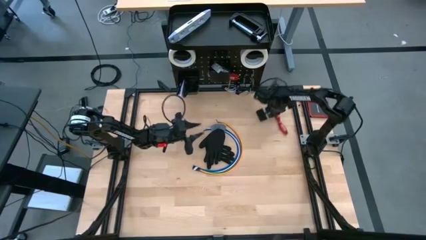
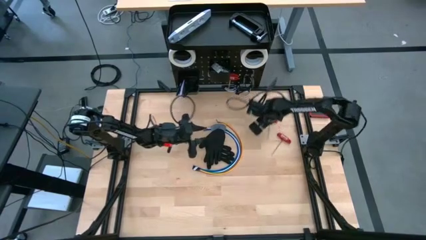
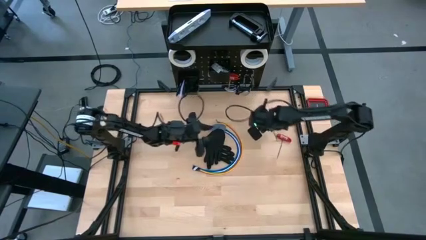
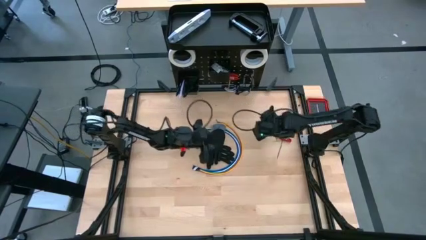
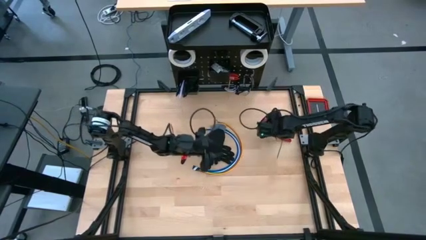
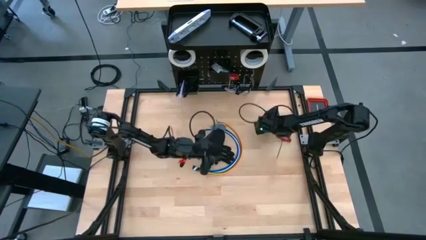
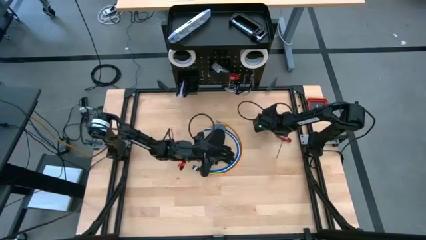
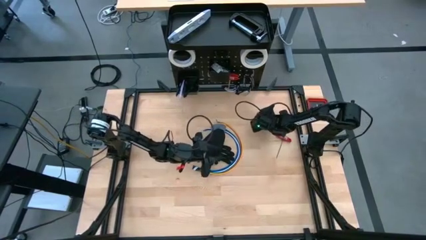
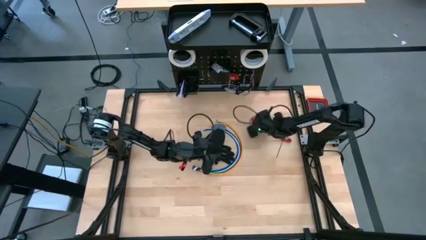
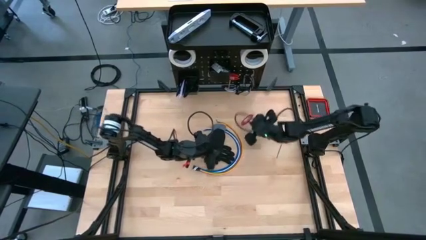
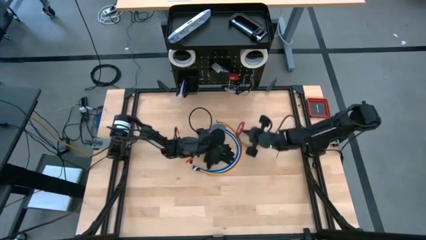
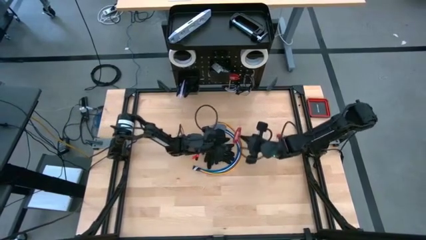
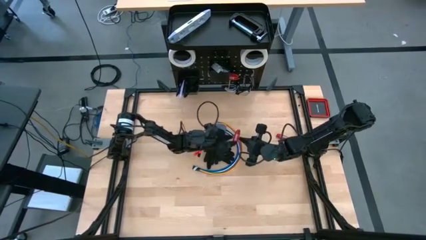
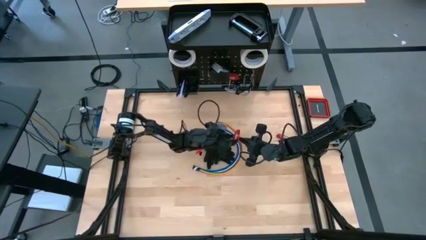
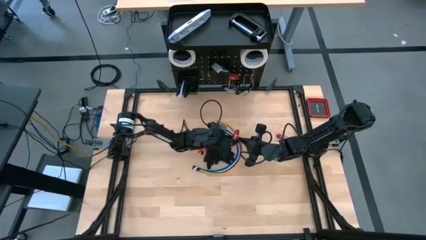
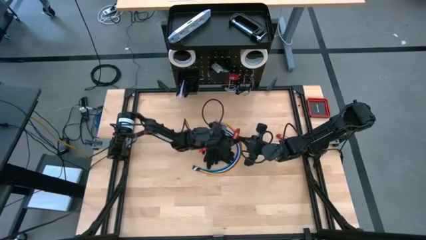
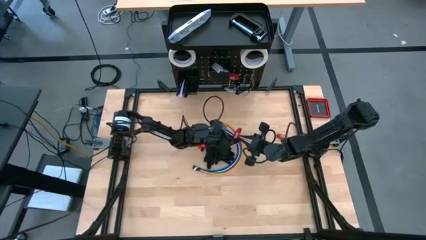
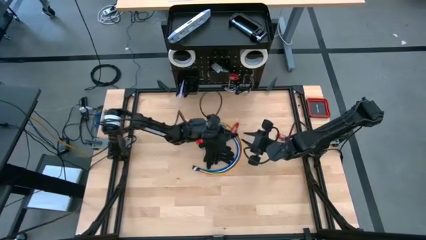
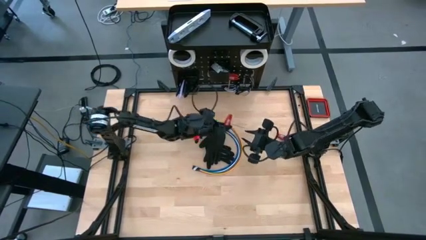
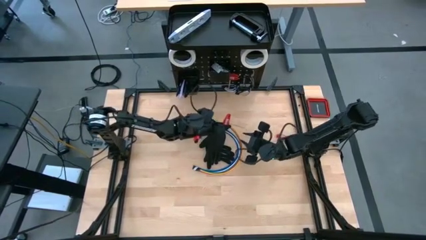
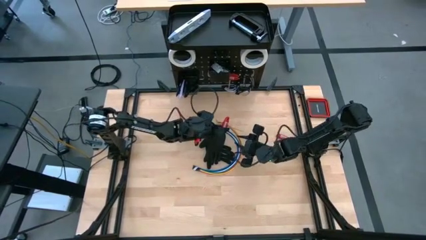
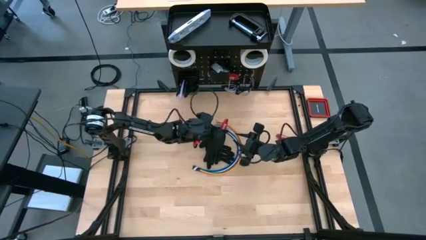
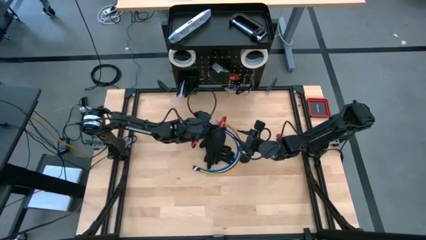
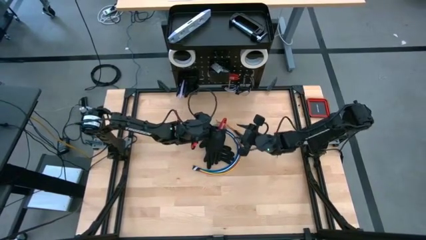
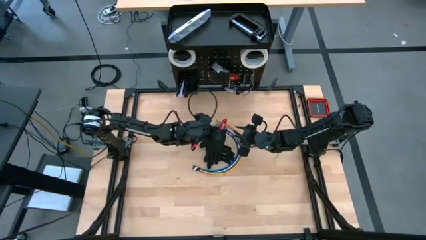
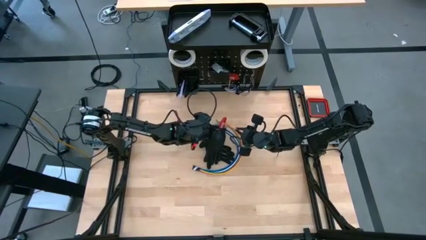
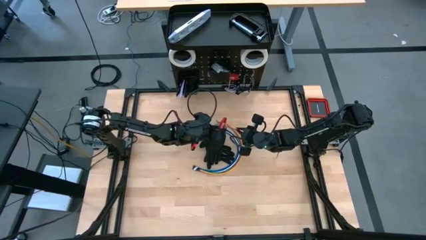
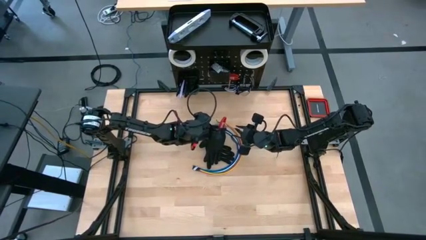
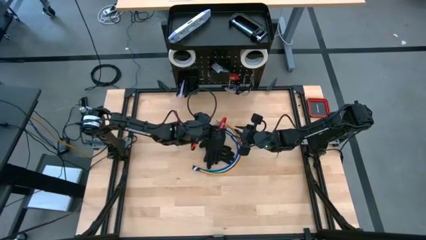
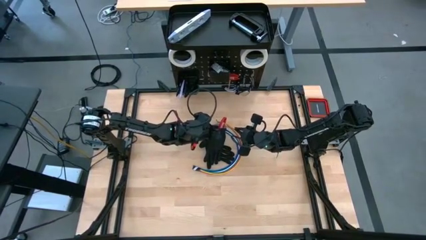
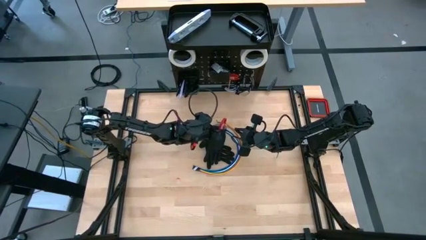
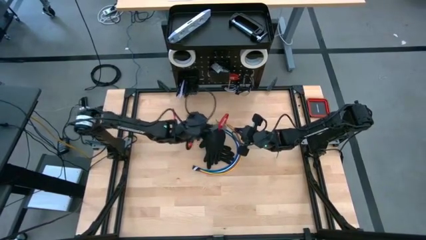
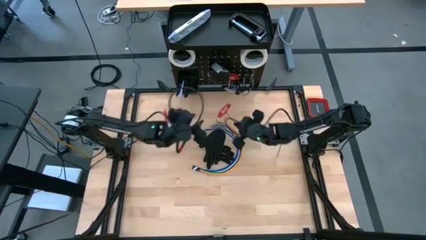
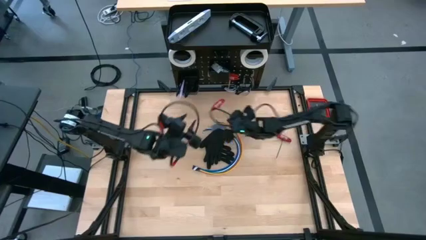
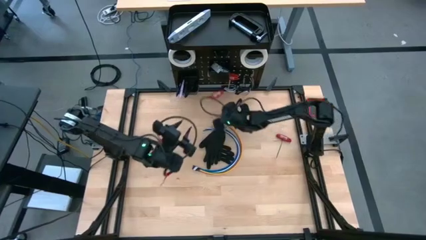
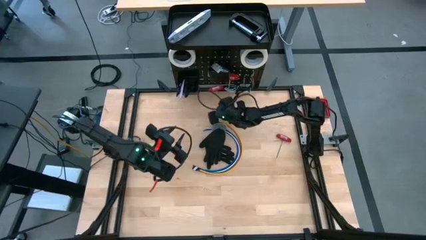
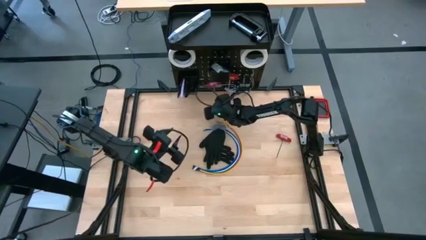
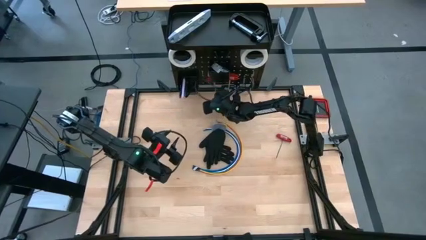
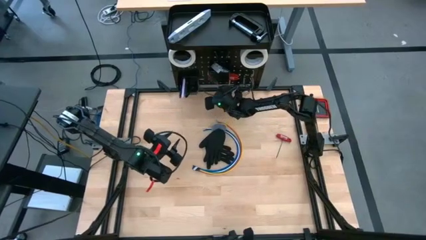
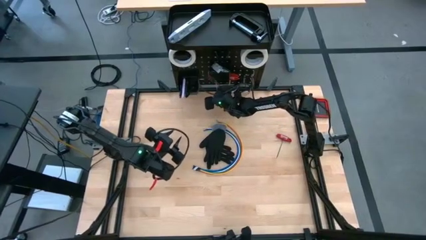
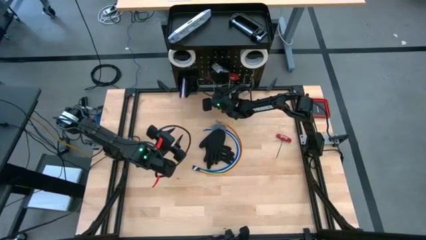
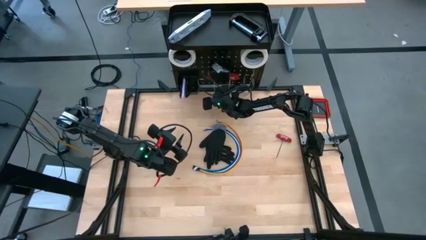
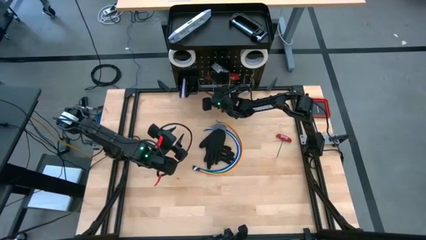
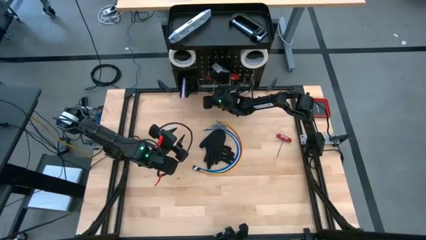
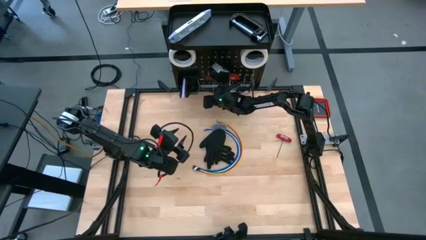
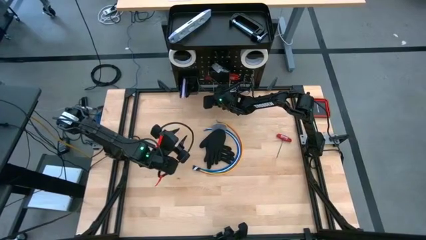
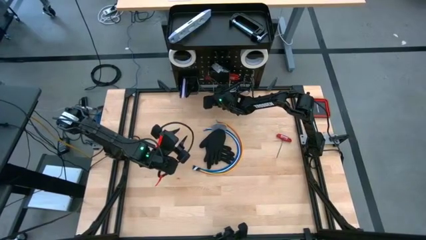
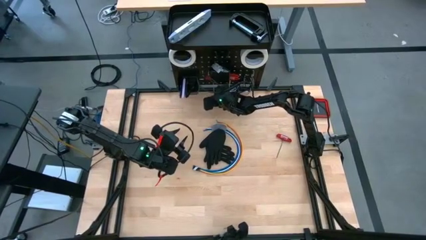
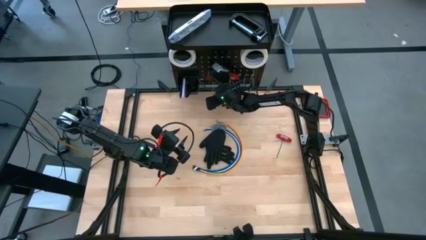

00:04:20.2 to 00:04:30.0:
Task: Hang tools onto peg board
Hang the red allen wrench on the peg board

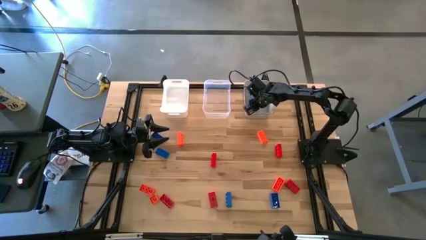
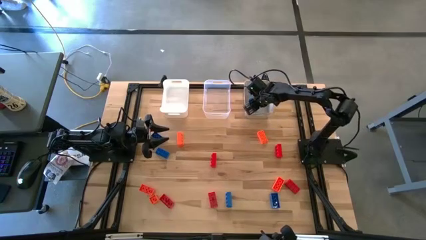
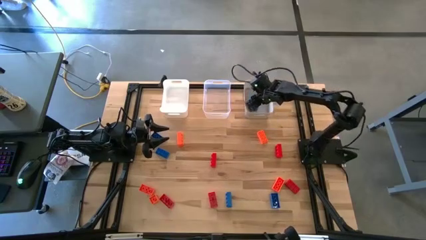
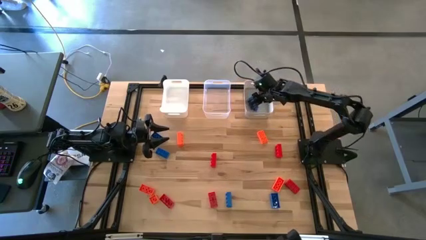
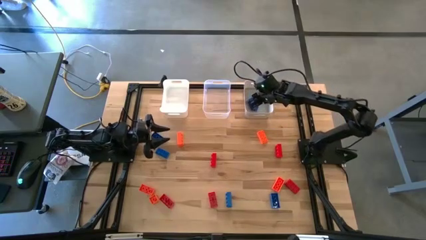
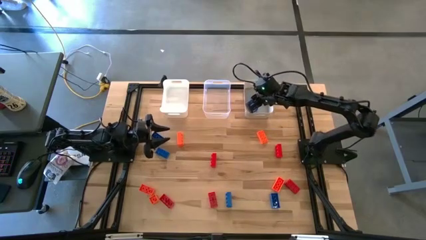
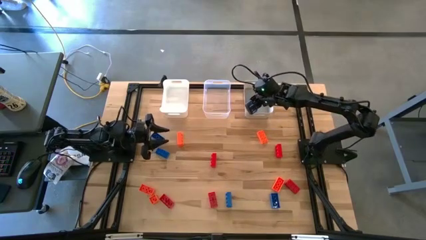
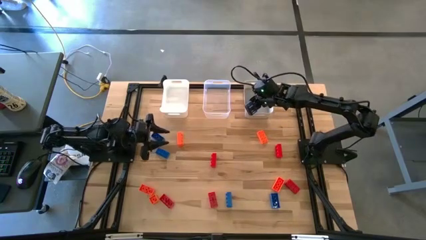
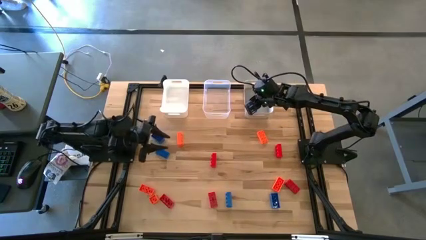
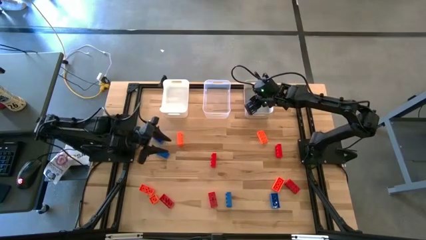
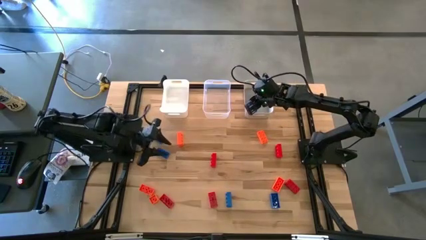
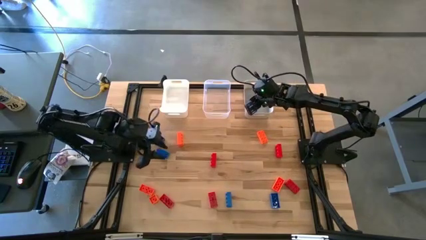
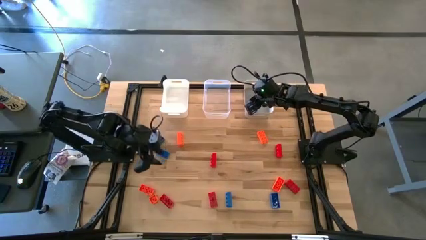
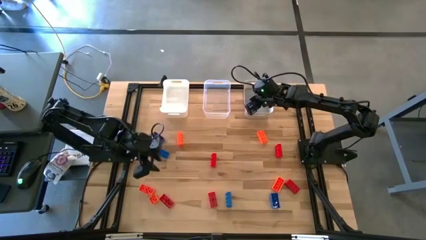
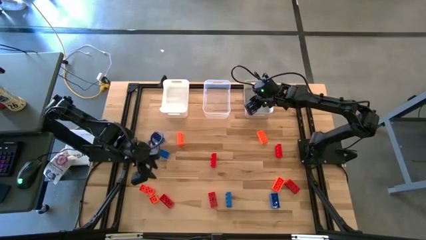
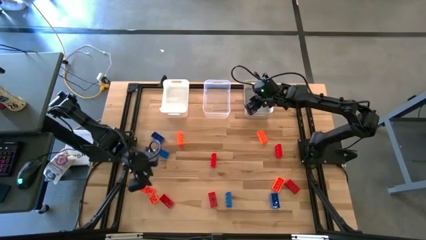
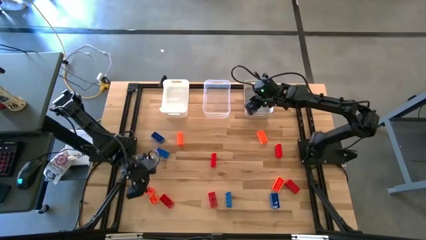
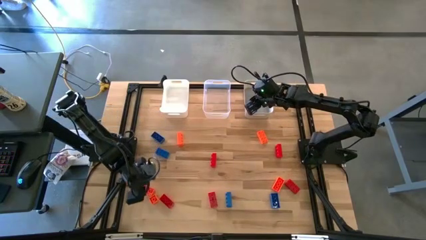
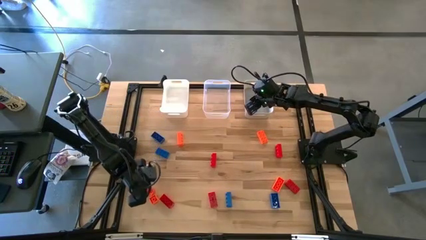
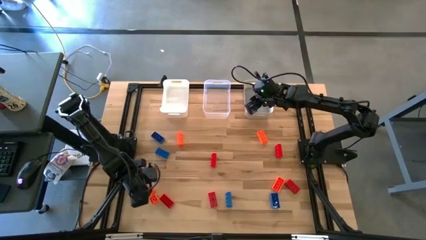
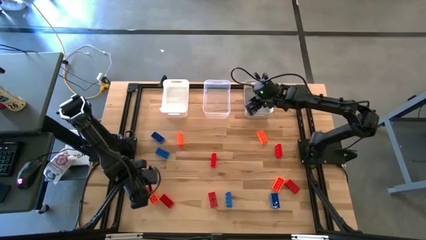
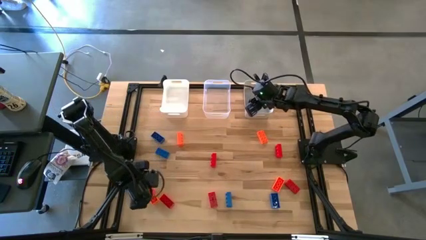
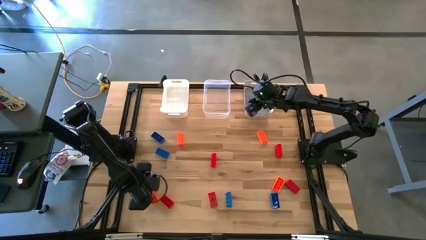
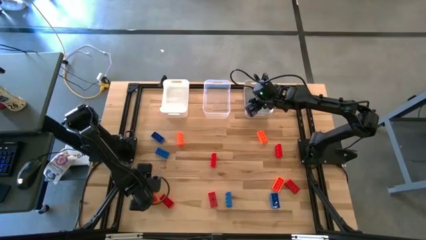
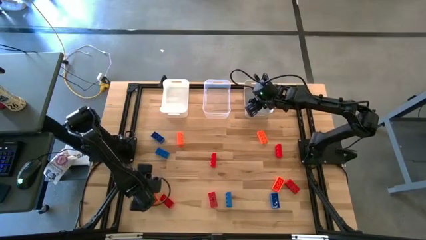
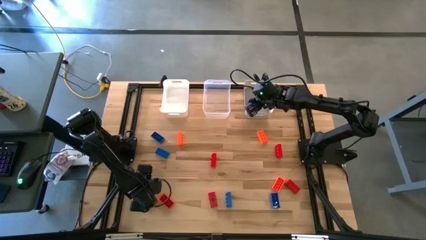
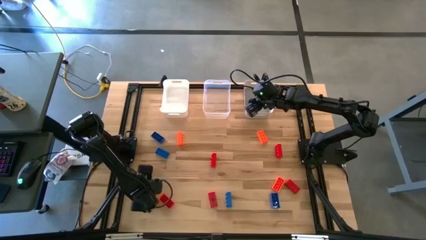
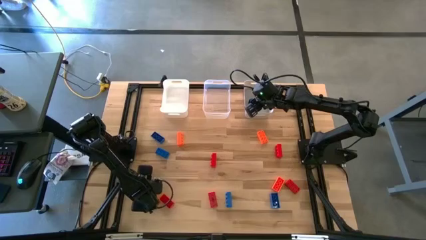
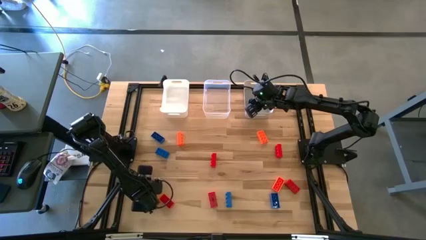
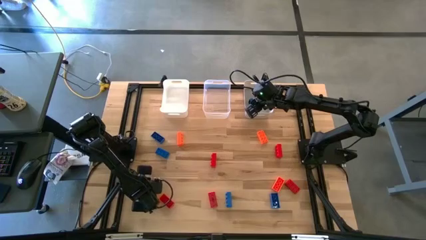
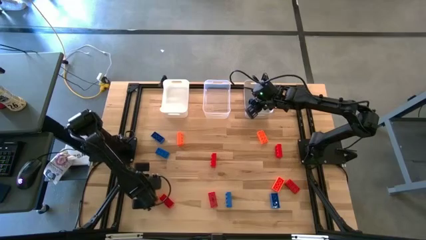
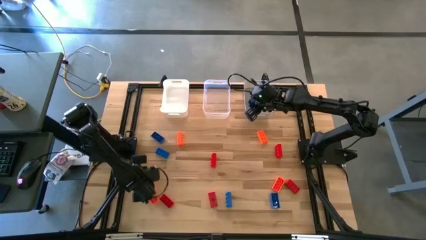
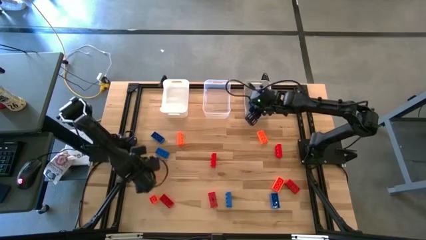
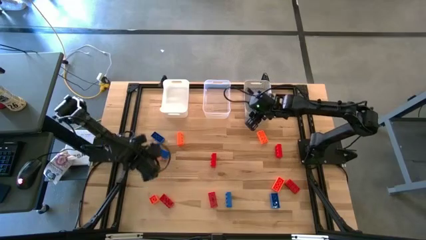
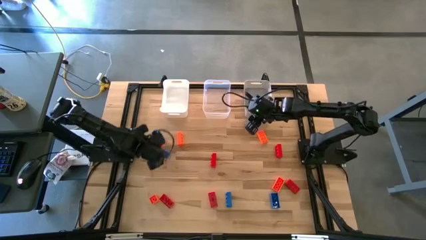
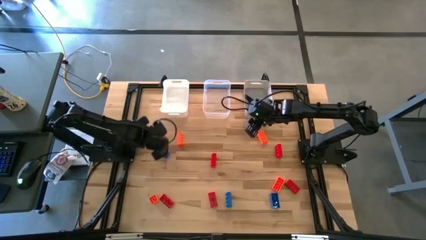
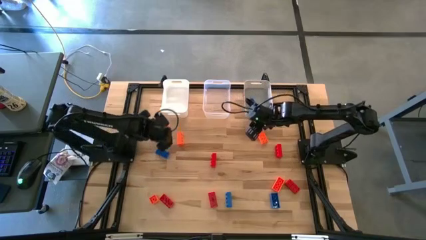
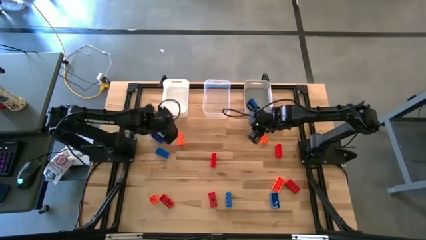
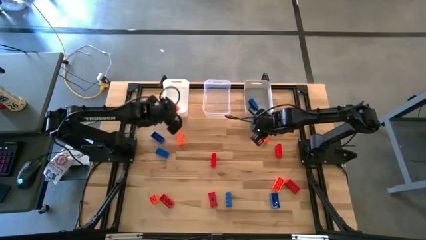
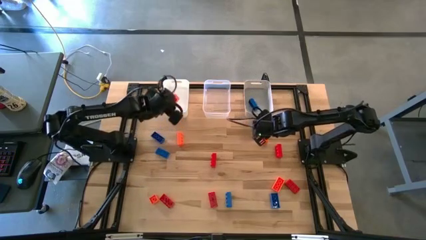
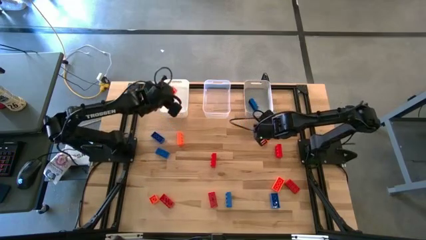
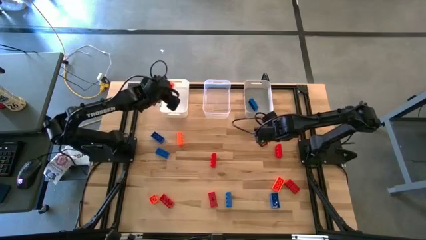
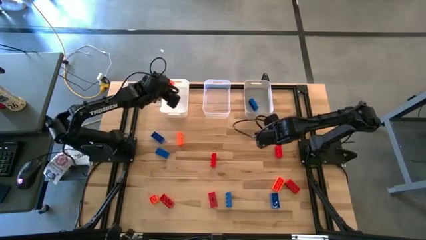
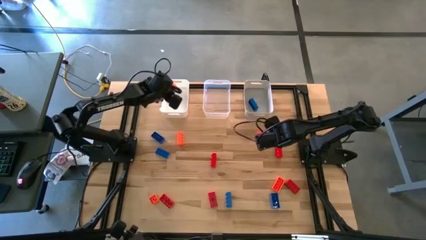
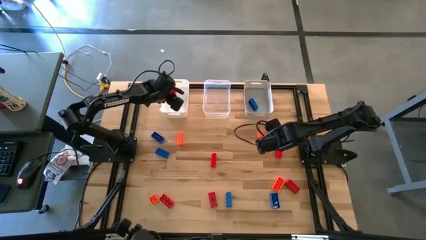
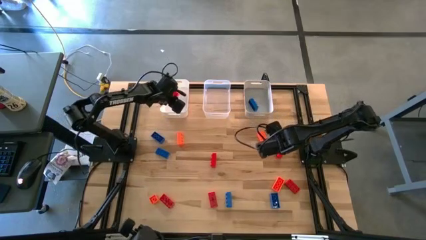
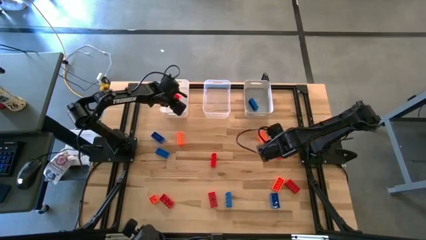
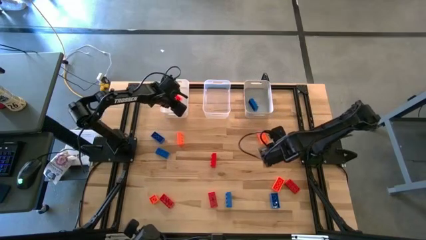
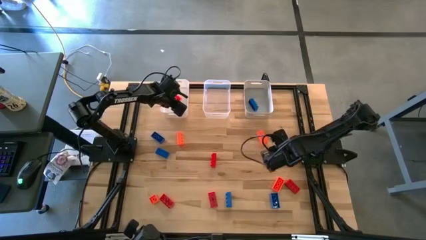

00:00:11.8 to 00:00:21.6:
Task: Sort & place blocks by color
Put the orange game piece into the white bin
